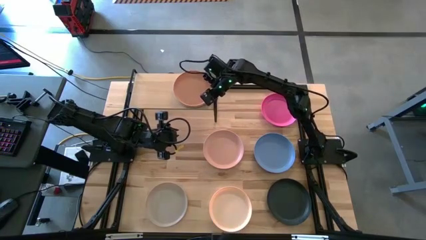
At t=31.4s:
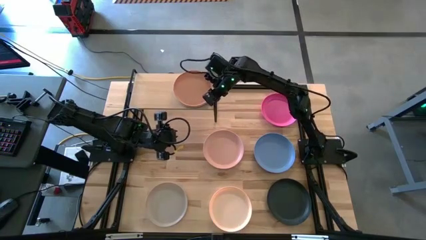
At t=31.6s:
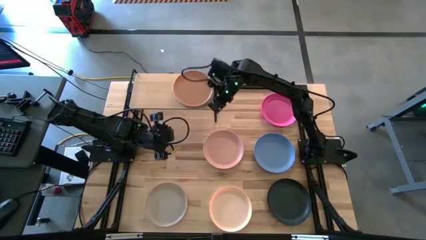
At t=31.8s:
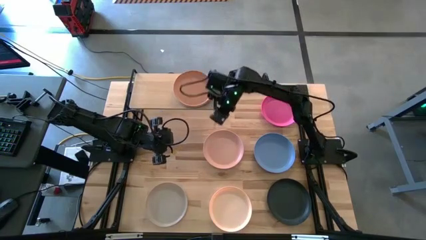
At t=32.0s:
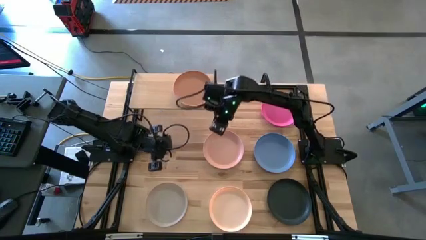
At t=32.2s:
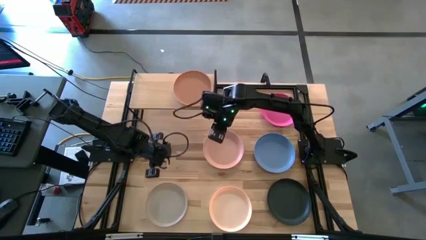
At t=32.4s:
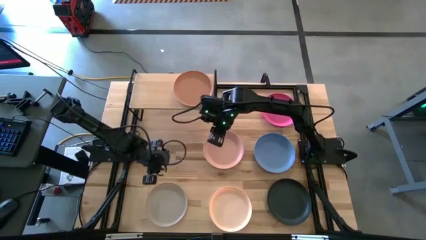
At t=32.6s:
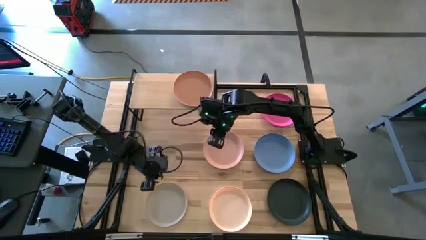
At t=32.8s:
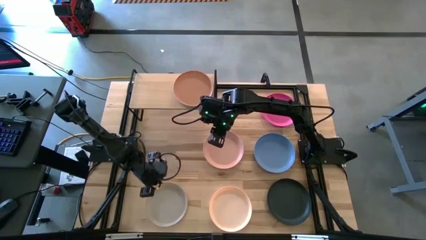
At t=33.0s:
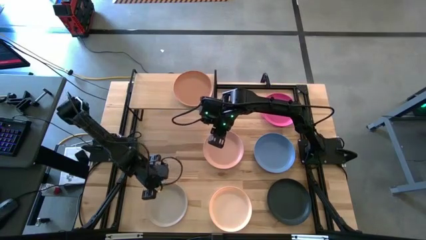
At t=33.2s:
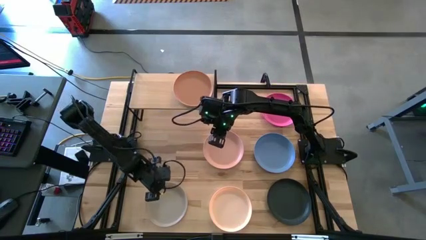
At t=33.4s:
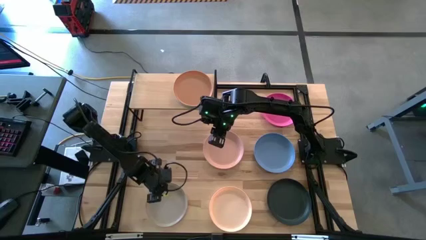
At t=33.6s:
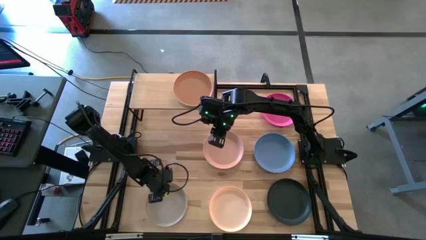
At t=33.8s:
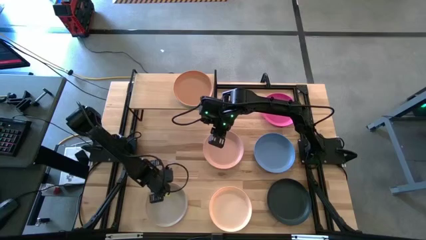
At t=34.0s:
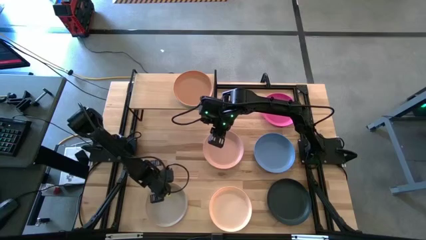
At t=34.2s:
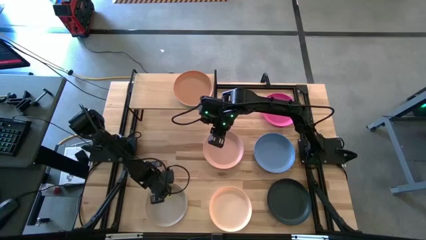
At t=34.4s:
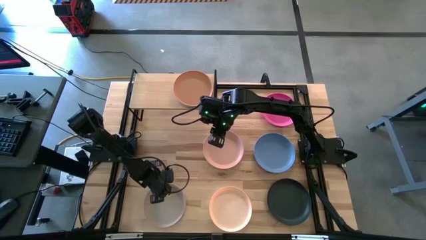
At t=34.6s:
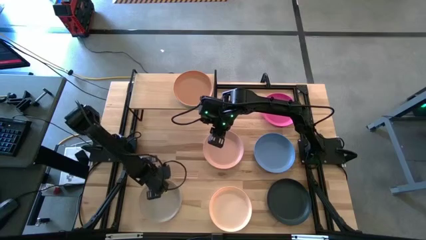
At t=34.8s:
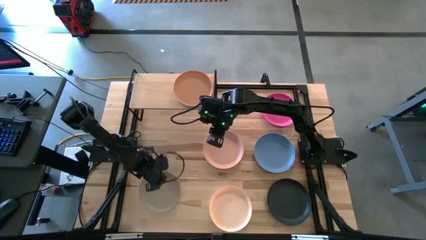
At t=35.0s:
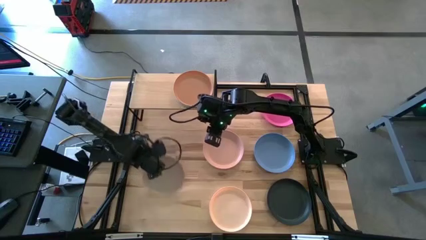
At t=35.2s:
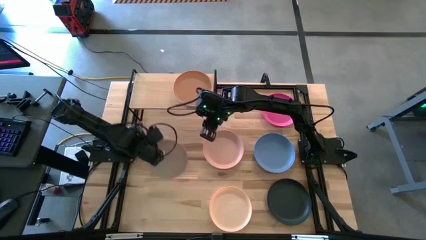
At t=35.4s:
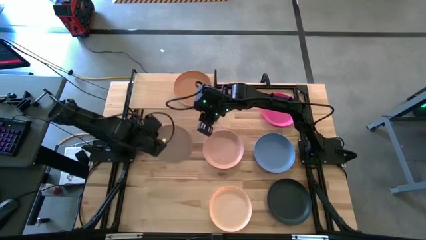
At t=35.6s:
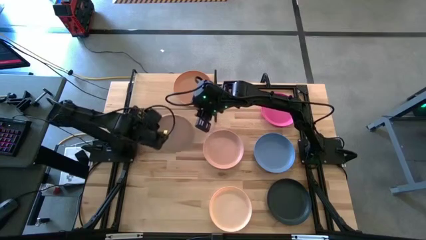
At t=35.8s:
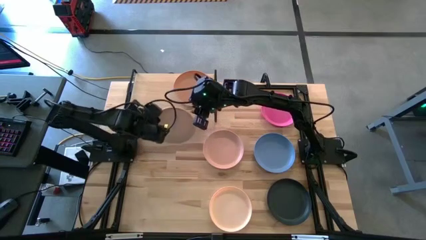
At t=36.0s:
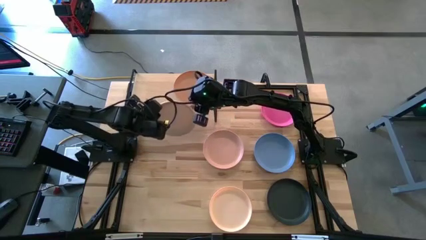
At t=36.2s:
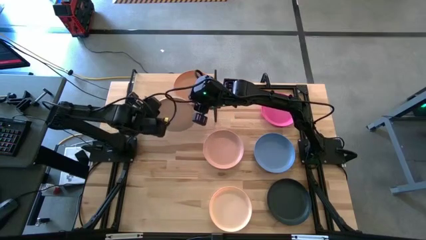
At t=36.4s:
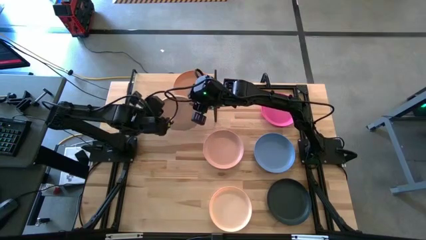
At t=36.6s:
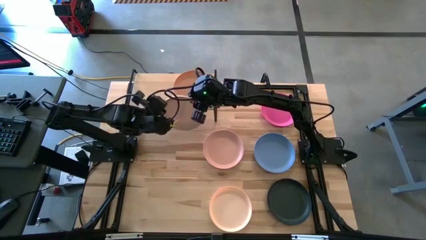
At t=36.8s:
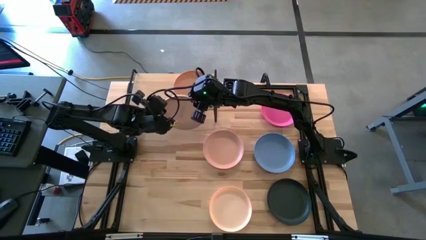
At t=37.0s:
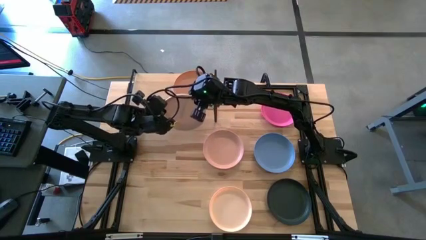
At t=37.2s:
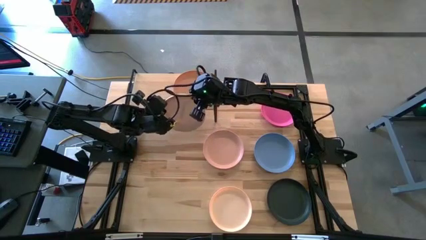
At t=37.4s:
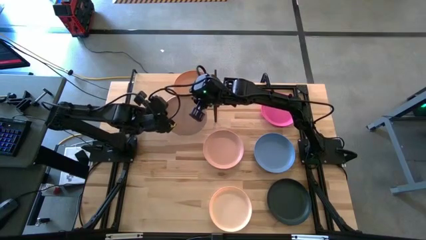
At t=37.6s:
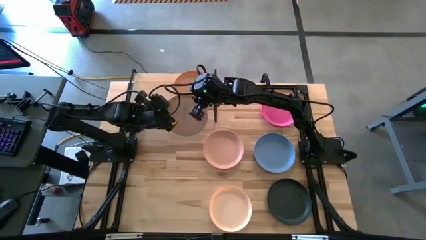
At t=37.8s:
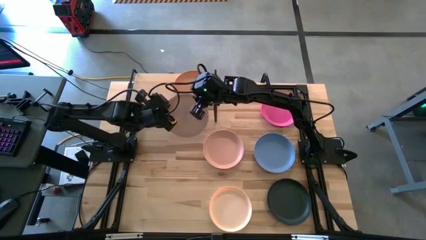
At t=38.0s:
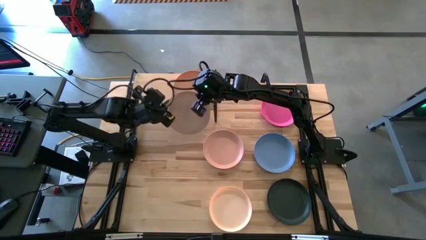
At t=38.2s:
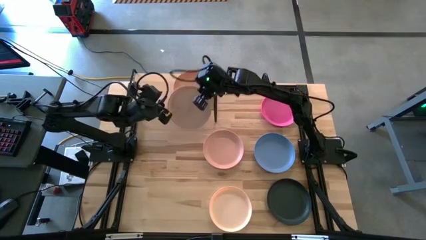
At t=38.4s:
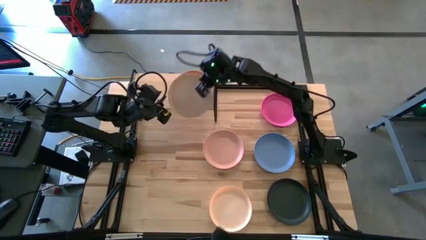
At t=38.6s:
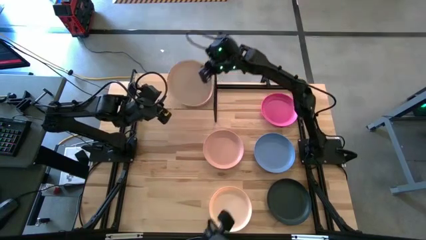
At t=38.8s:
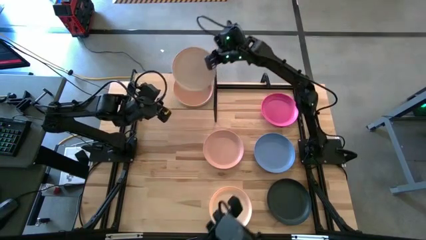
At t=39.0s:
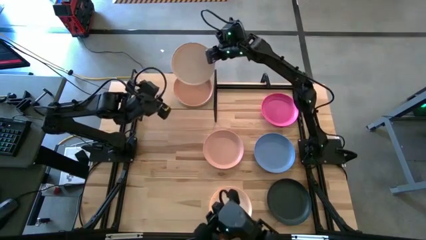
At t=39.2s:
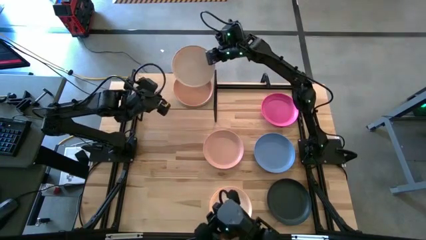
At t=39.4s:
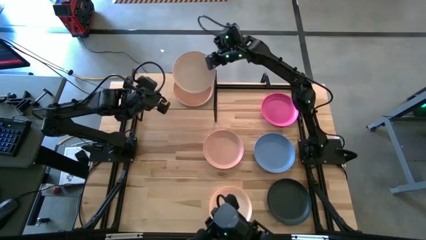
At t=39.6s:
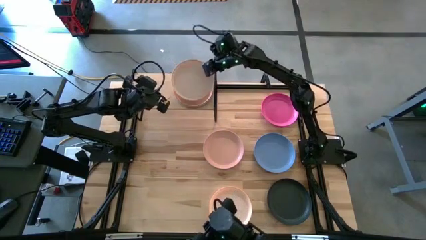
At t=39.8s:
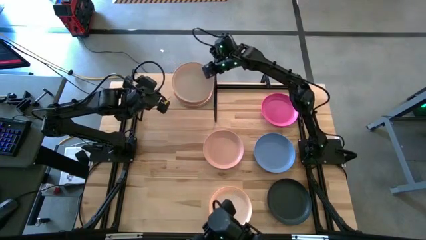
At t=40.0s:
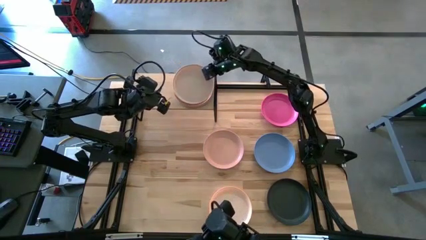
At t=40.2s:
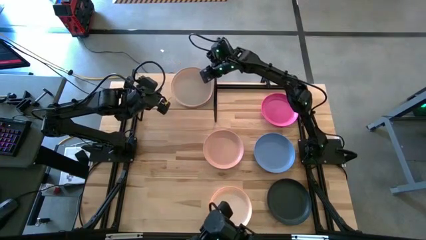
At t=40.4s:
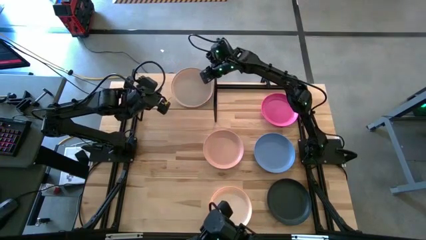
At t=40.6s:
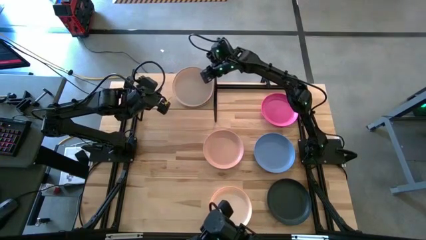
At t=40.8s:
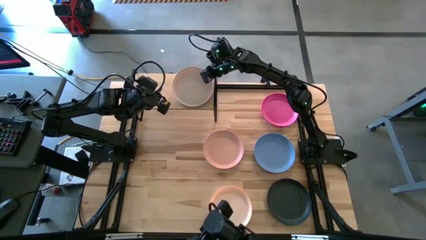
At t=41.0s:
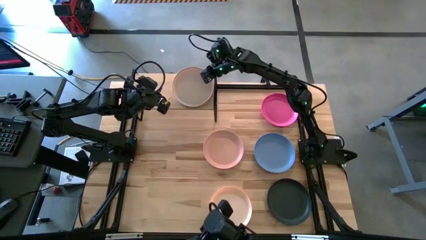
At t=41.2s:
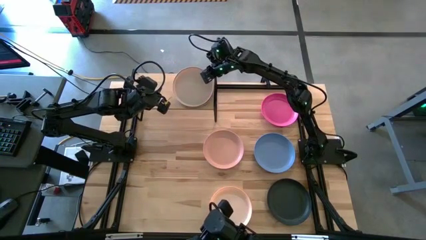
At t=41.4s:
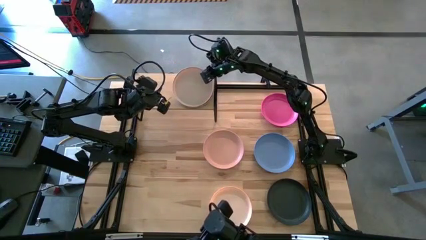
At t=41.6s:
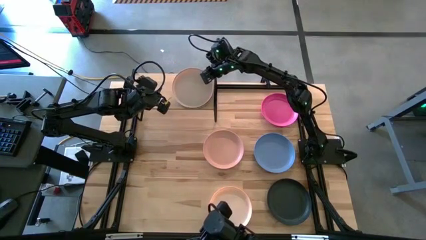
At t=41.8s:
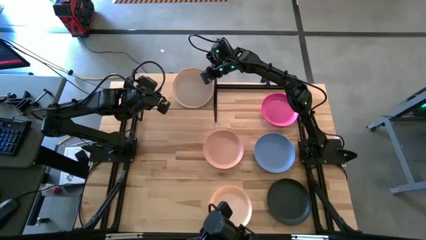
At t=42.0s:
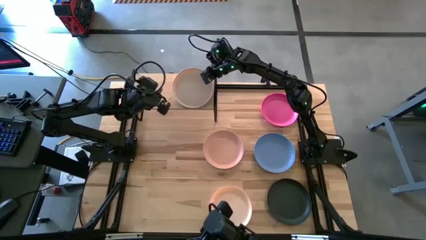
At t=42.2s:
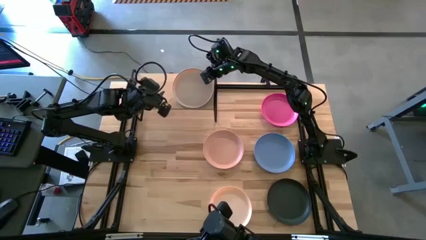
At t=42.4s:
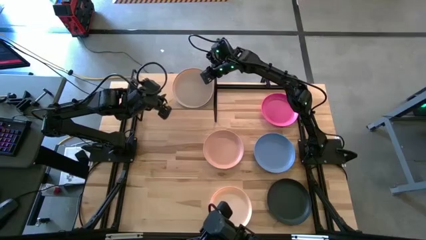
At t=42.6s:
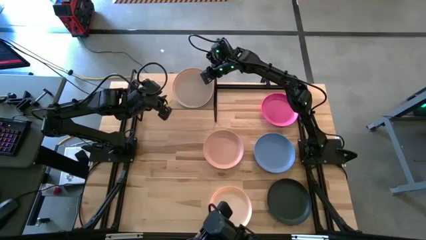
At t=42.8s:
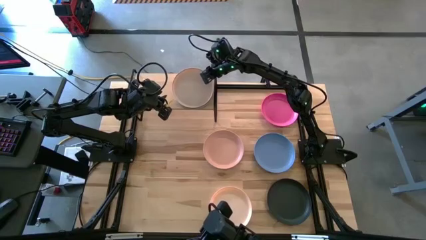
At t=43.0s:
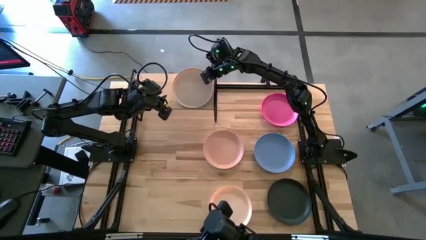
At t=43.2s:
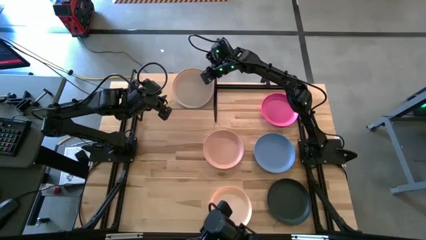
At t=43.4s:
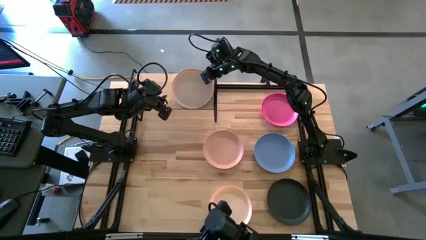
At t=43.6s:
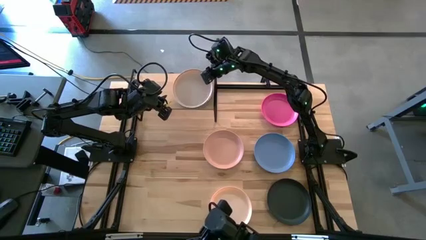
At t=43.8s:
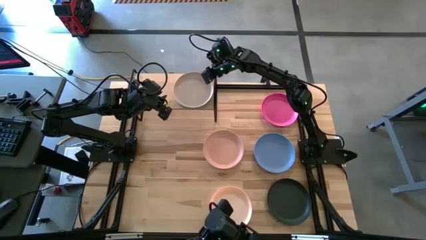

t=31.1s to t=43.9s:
Task: Place and stack plates onto a shelf
Stack the gray plate on top of the brown plate on the shelf
